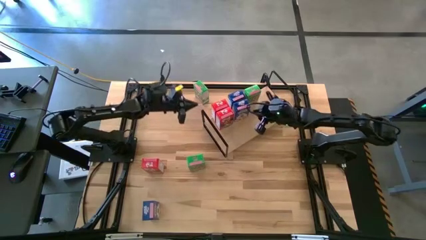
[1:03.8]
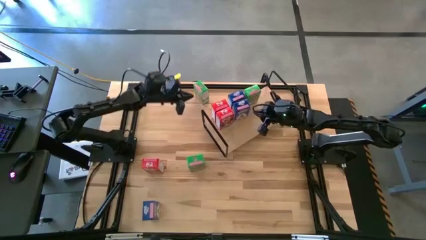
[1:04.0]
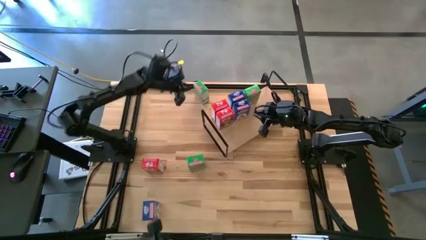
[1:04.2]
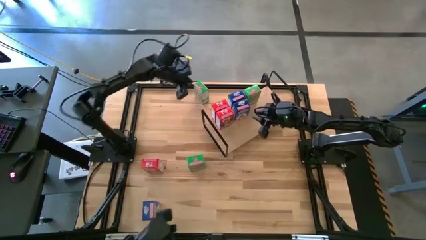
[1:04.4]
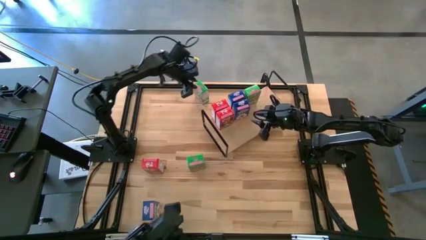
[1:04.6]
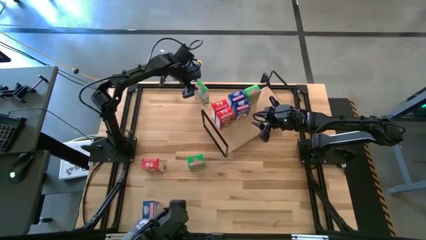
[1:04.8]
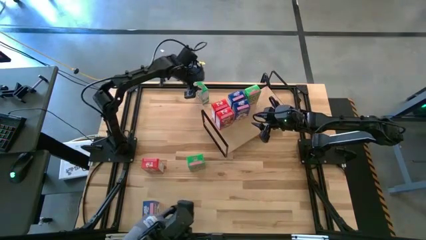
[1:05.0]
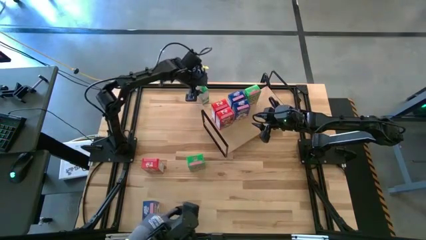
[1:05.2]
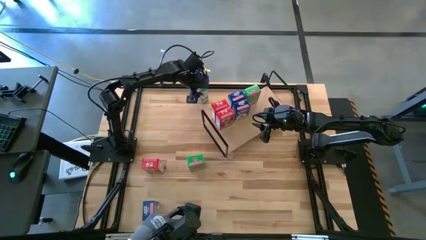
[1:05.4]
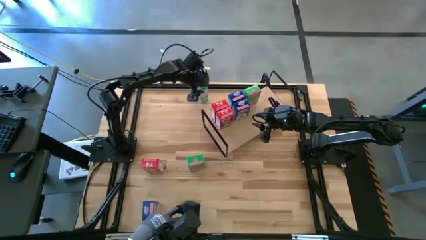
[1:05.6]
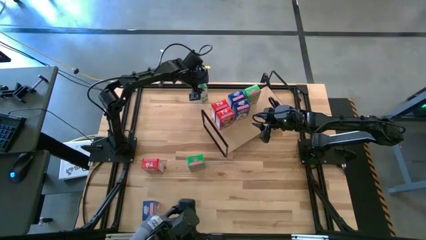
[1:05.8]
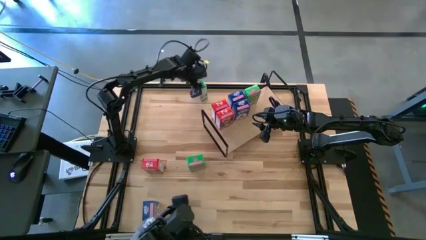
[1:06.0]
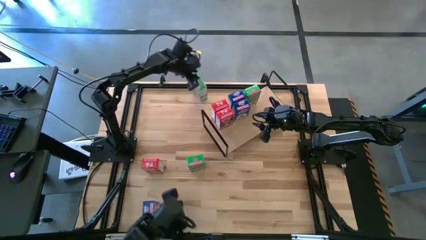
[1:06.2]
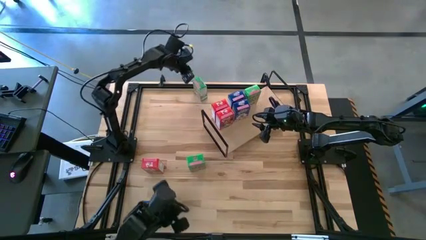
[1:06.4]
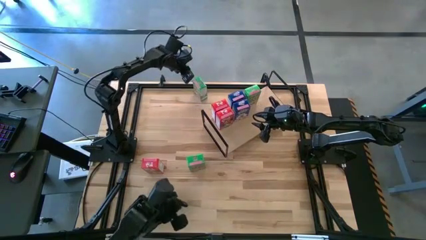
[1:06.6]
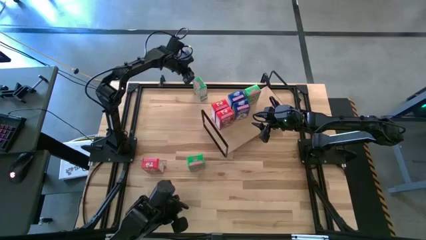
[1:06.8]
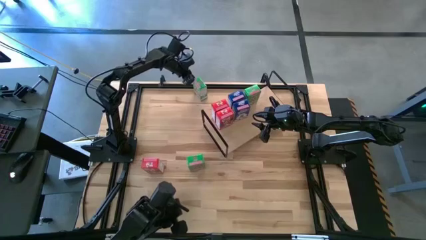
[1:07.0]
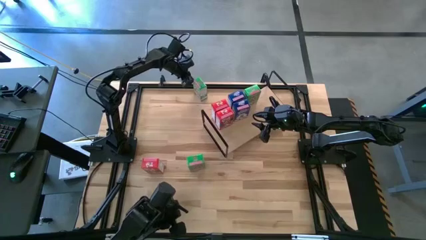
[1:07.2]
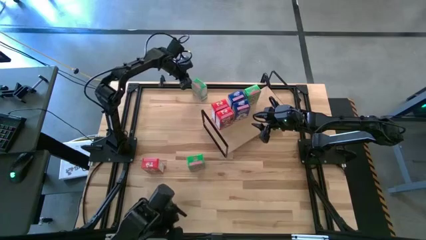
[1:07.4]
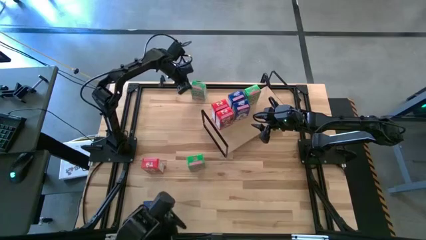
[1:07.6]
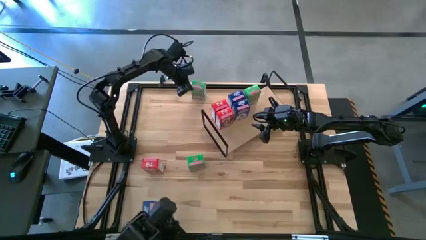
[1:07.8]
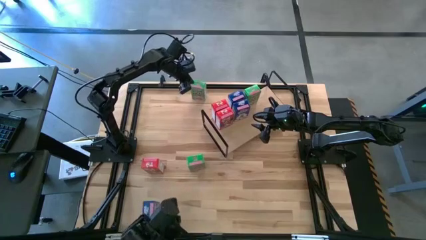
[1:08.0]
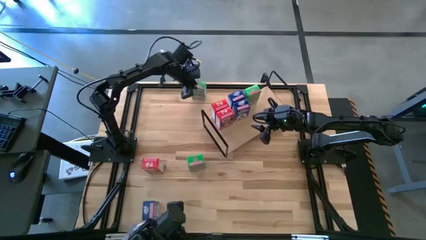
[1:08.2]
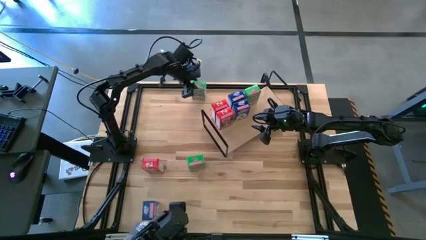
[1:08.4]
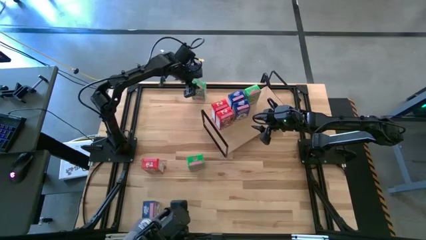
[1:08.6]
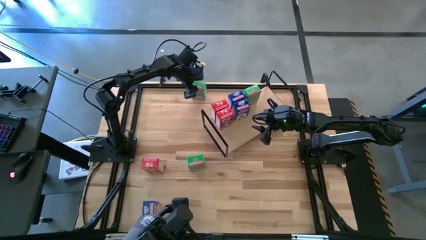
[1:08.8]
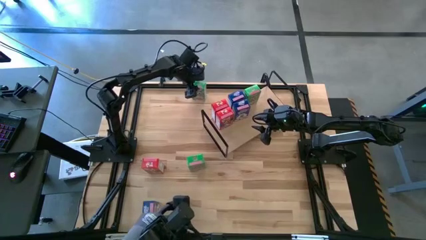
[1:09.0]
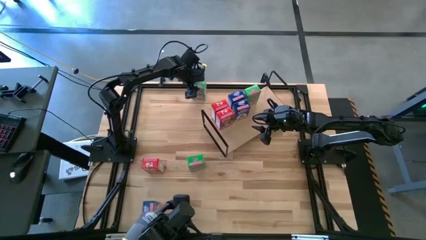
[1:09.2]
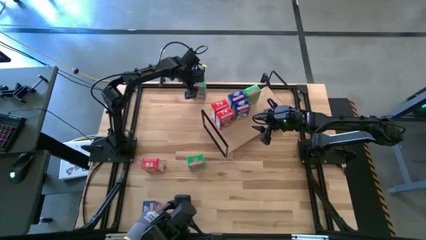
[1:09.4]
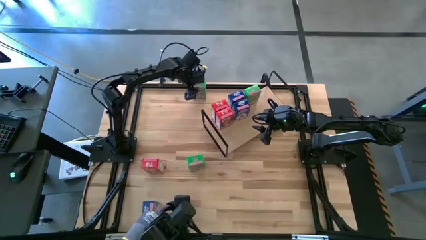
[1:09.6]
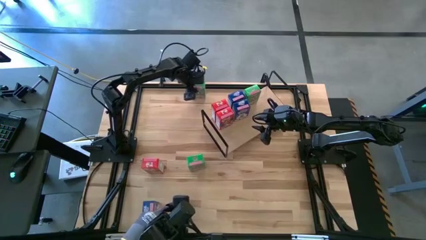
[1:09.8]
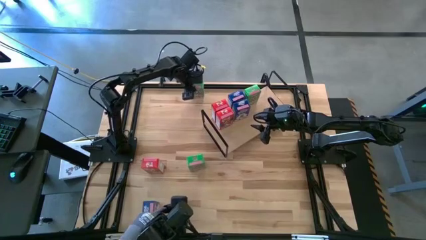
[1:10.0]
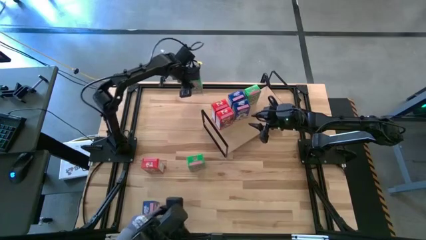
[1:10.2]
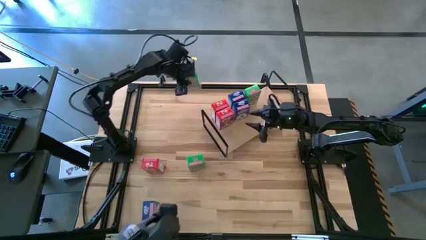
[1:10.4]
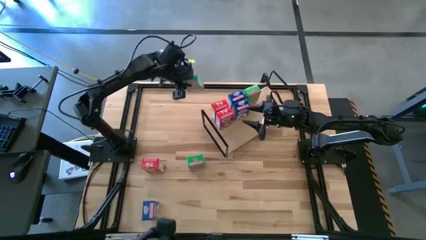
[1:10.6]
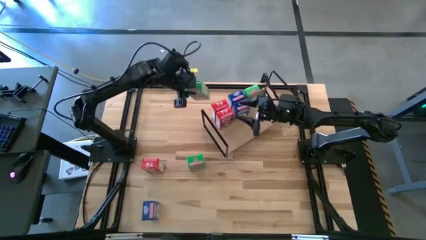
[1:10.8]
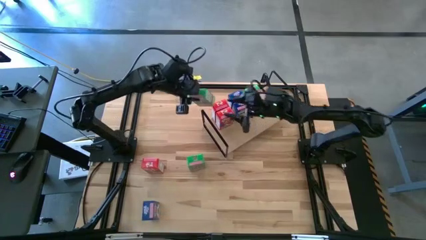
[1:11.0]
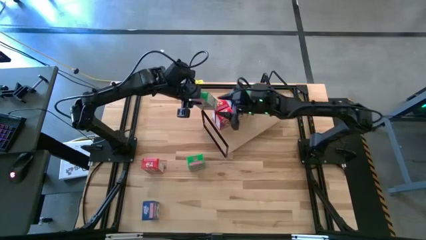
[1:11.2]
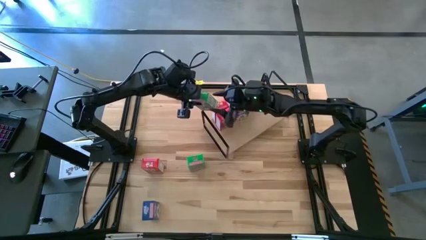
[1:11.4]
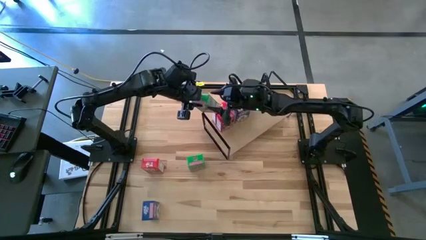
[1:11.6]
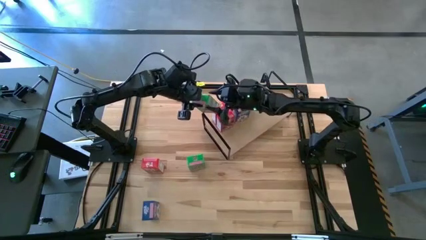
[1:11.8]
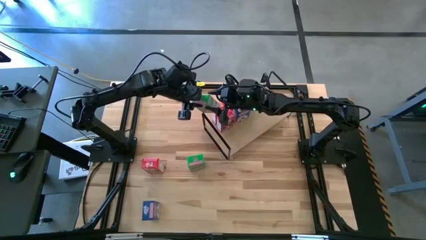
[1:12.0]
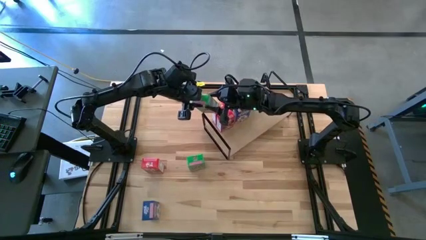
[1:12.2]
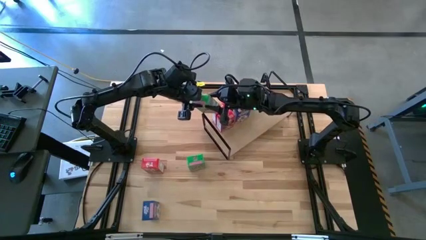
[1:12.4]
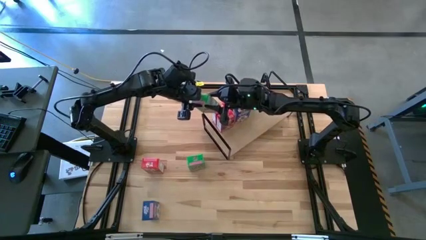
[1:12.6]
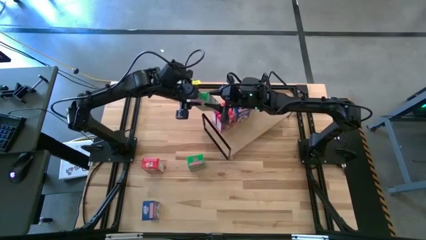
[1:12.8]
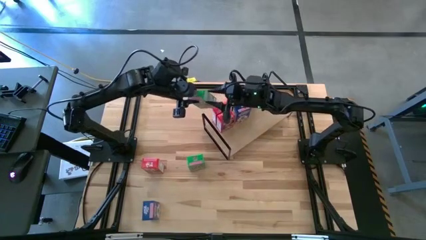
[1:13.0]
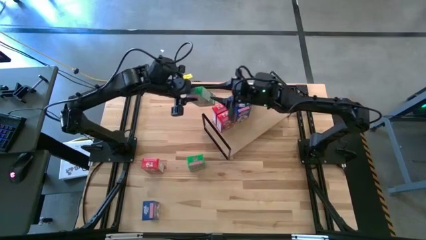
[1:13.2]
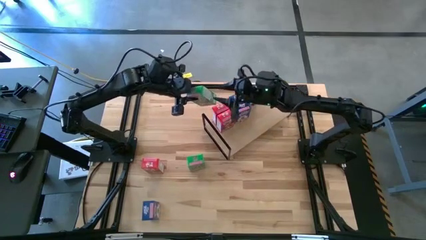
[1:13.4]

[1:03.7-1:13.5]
Task: Stack cereal on shelf
Put the top green cereal box on the shelf aligned with the other green cereal box

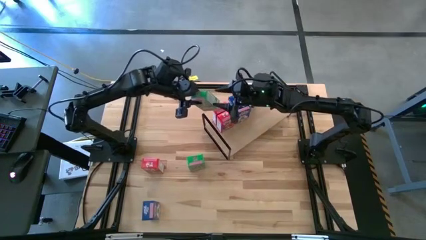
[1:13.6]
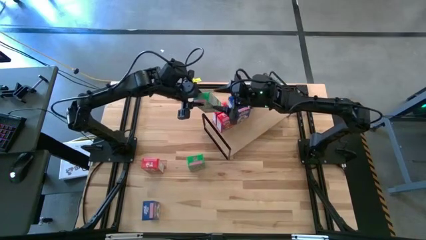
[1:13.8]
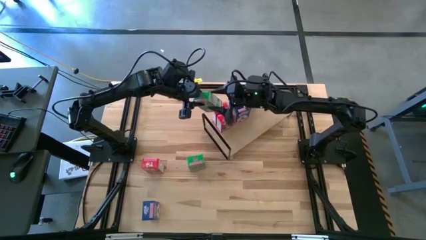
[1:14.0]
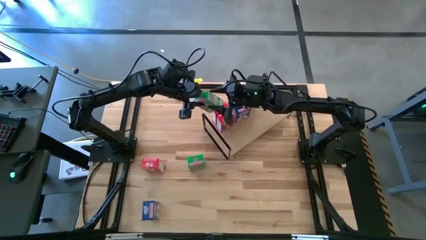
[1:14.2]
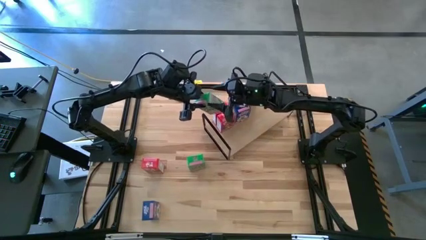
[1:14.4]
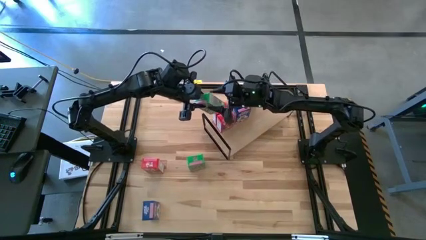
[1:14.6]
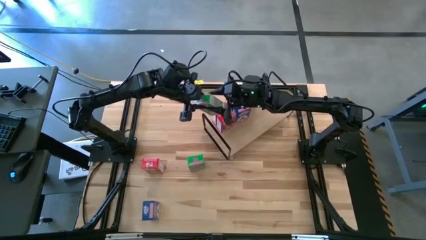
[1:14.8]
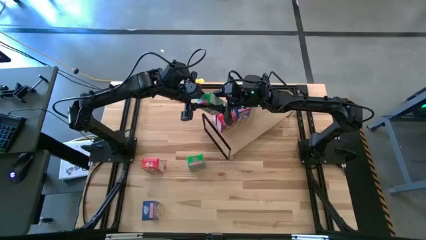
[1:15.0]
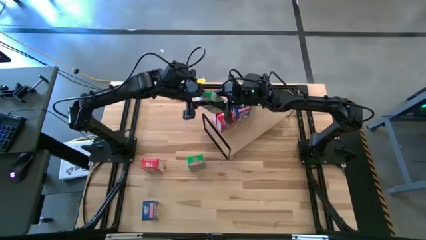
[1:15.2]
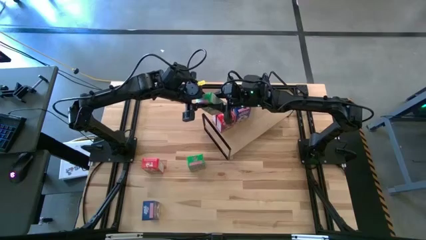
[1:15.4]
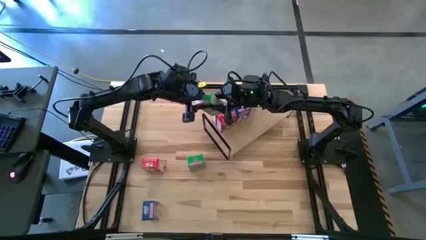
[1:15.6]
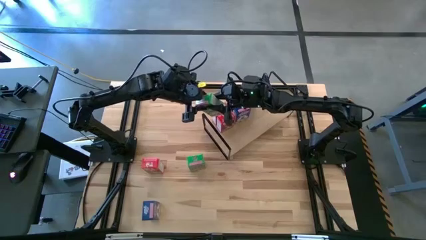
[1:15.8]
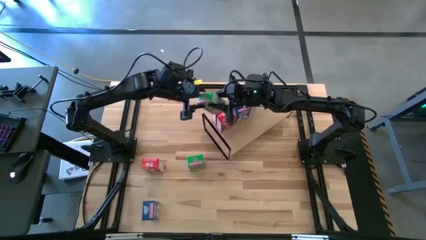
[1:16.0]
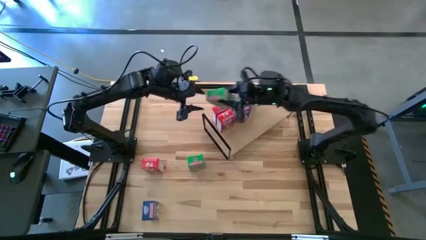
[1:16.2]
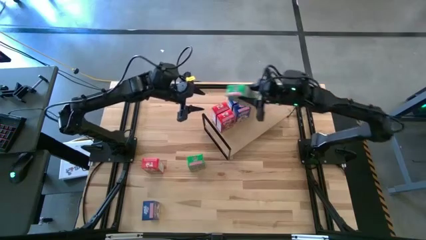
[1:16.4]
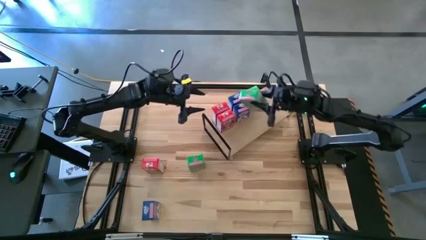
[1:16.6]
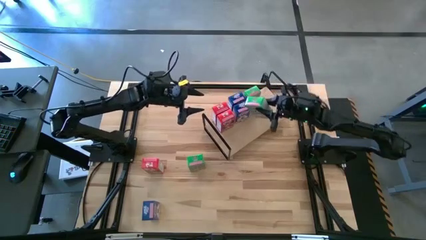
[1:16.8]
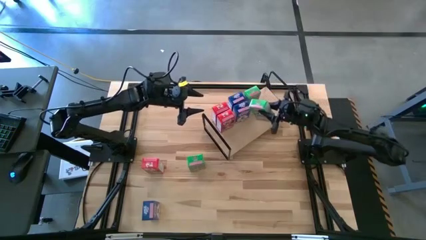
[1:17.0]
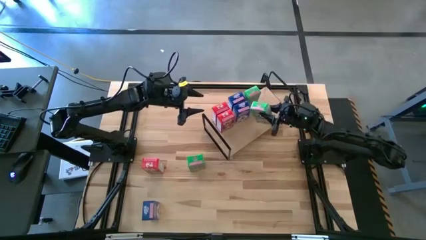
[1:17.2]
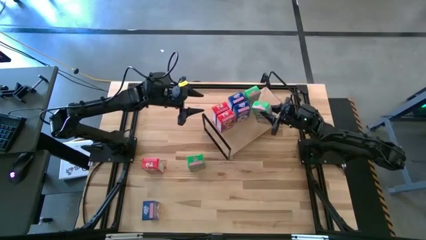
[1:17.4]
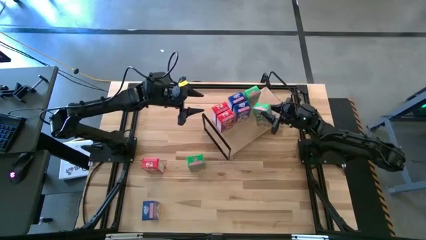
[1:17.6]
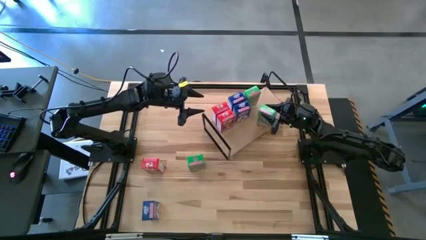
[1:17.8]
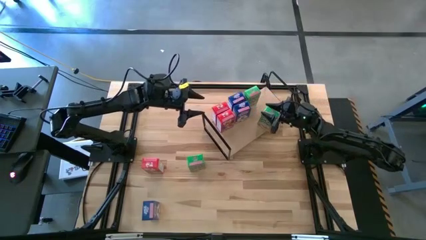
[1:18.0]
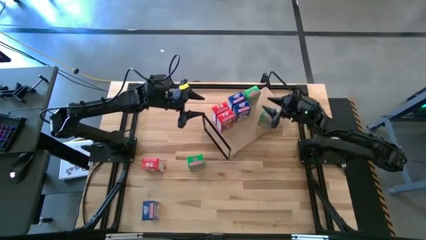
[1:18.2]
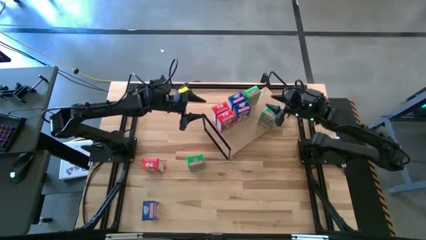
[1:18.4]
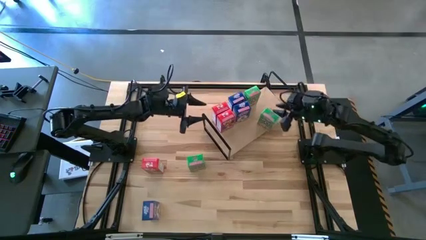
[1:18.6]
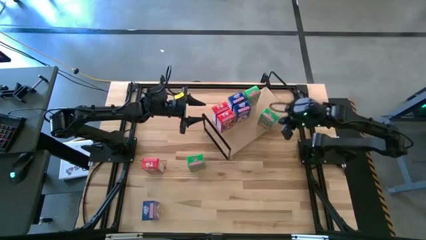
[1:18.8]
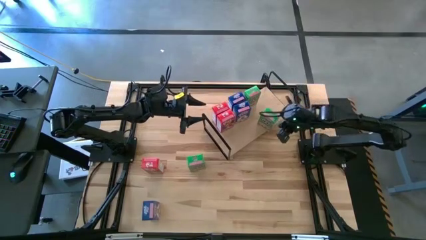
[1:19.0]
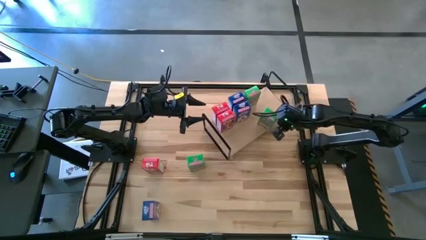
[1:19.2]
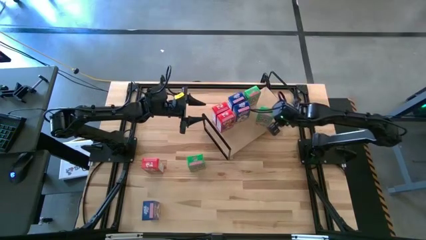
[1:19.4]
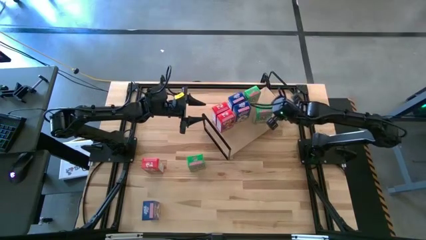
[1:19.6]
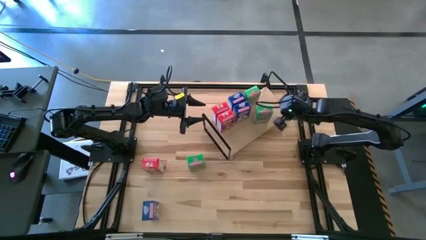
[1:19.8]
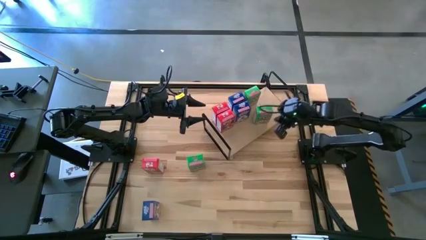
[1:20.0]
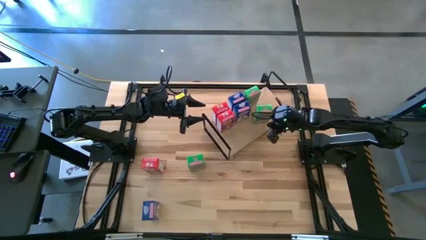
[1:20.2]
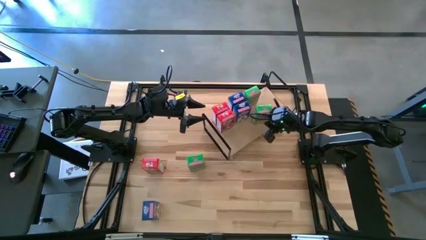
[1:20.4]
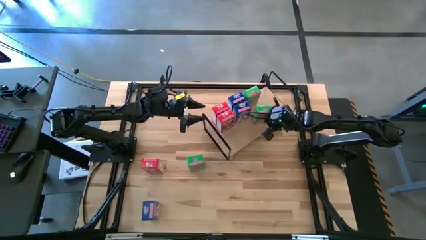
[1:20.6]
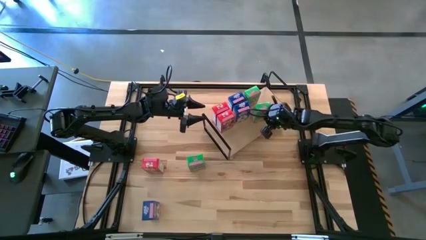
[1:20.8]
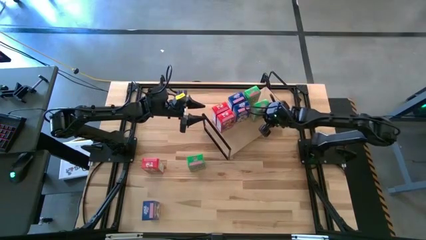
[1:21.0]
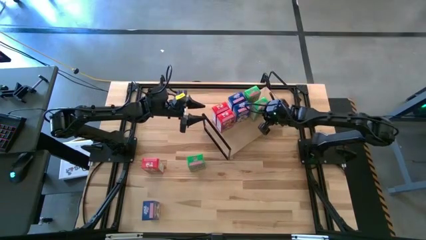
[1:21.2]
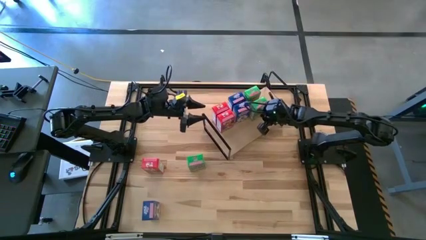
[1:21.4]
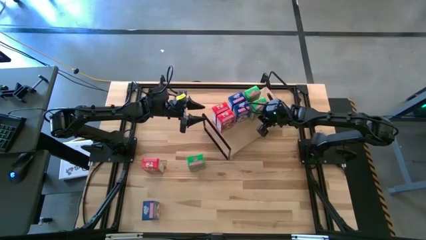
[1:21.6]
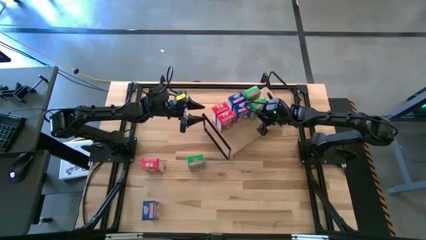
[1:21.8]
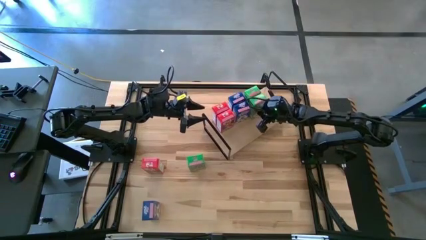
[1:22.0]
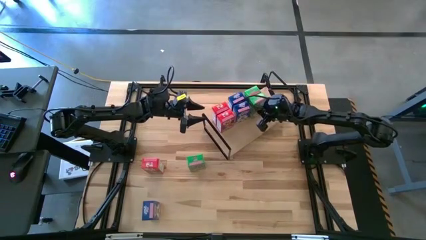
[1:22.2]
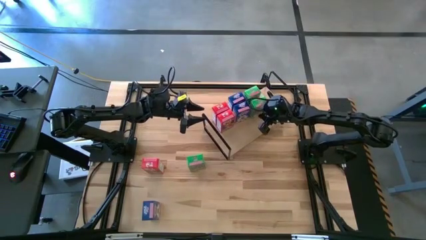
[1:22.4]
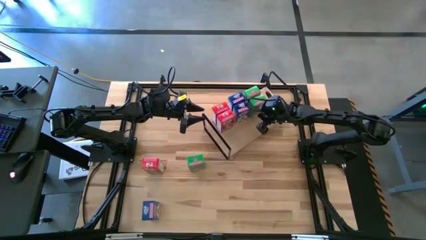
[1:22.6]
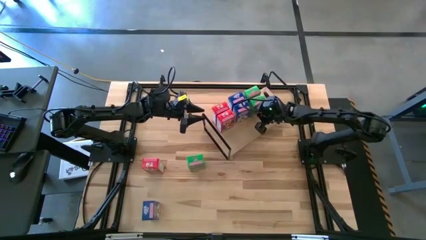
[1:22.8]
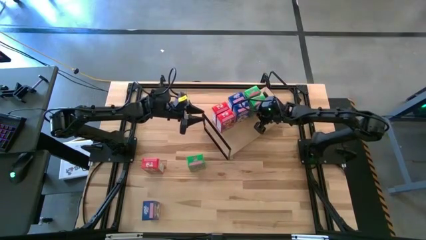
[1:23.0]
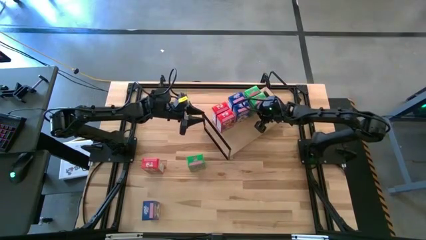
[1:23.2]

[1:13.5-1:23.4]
Put the top green cereal box on the shelf aligned with the other green cereal box
